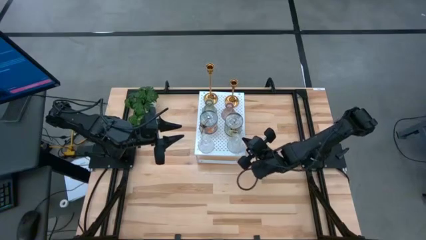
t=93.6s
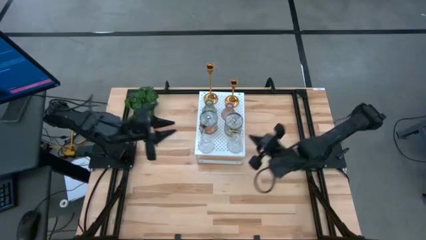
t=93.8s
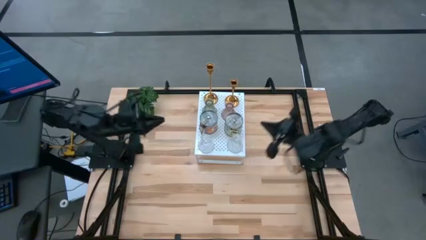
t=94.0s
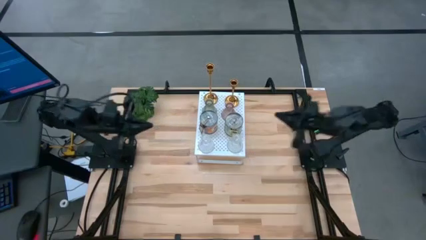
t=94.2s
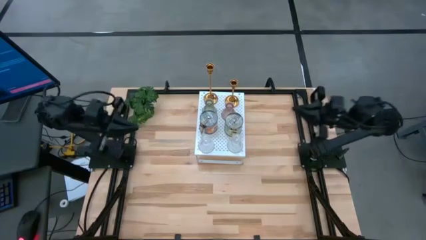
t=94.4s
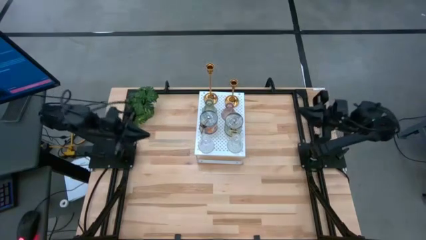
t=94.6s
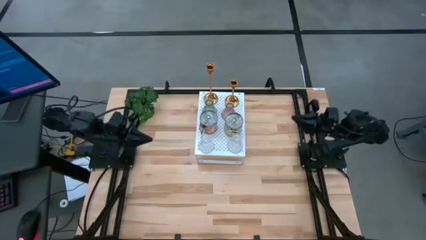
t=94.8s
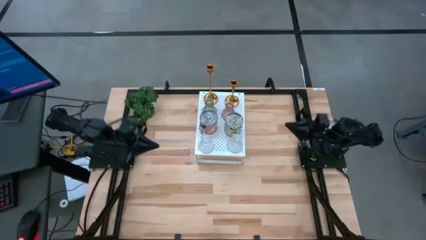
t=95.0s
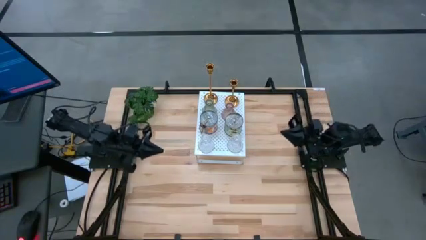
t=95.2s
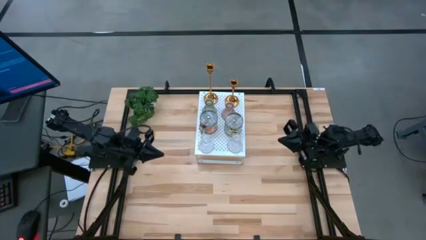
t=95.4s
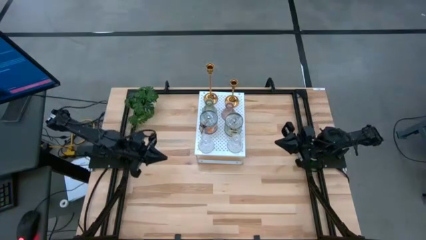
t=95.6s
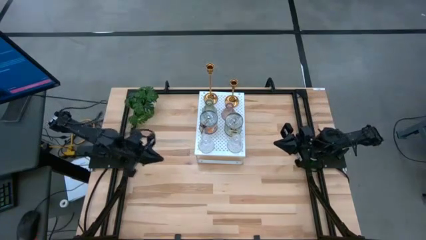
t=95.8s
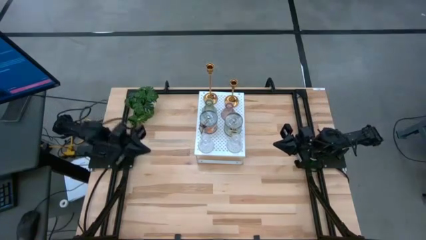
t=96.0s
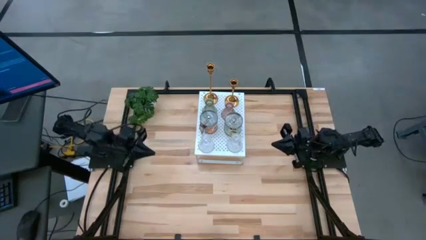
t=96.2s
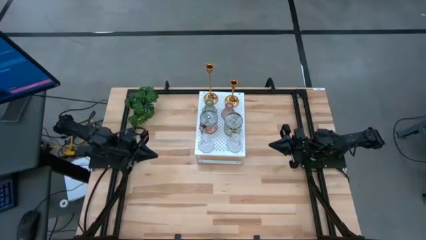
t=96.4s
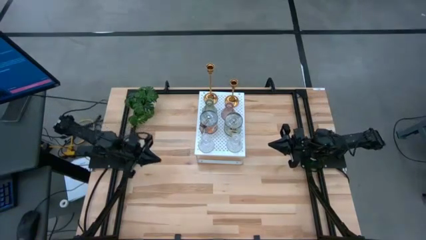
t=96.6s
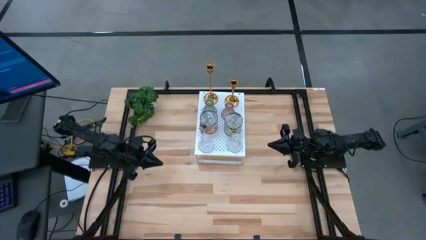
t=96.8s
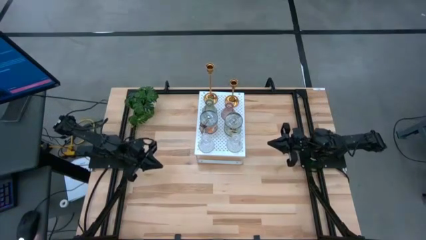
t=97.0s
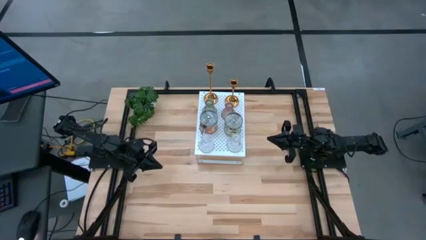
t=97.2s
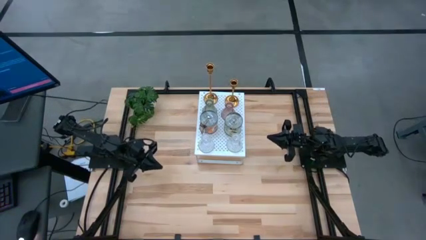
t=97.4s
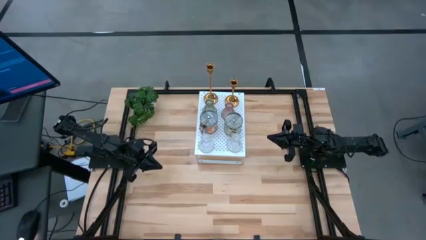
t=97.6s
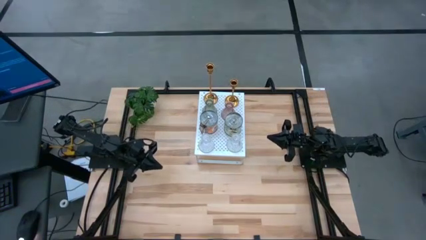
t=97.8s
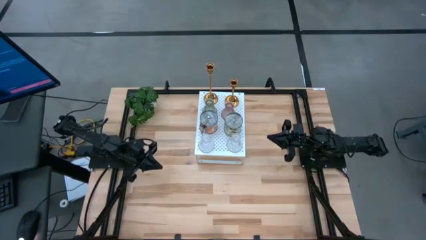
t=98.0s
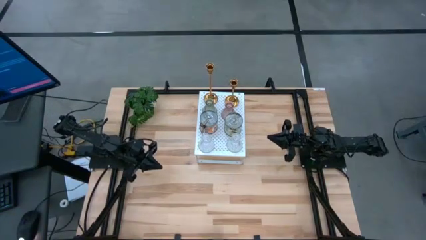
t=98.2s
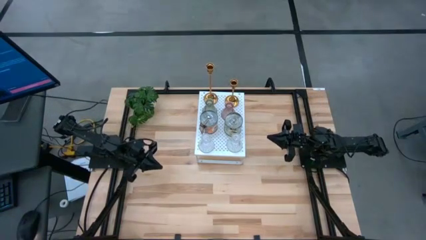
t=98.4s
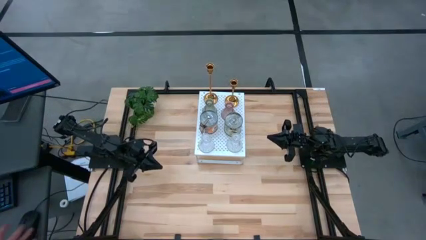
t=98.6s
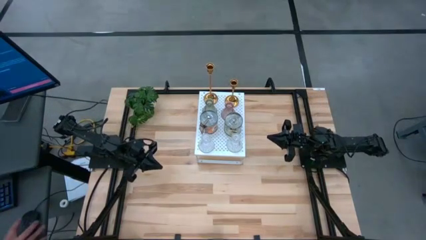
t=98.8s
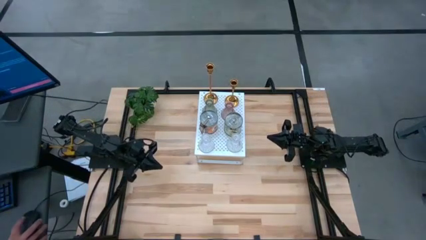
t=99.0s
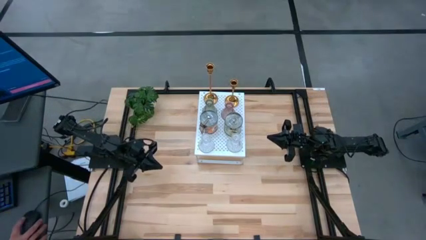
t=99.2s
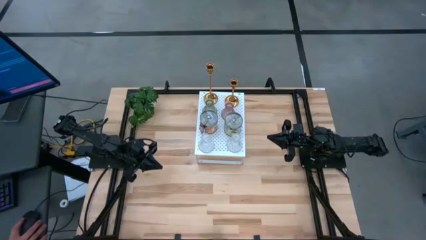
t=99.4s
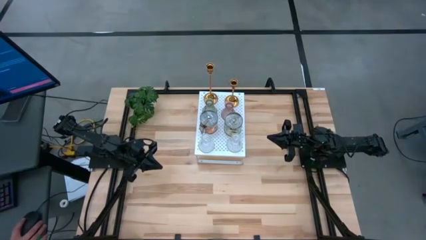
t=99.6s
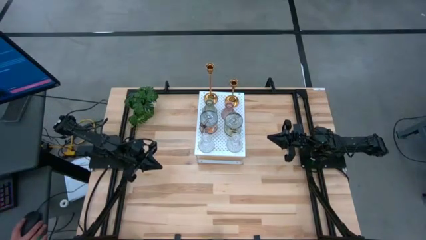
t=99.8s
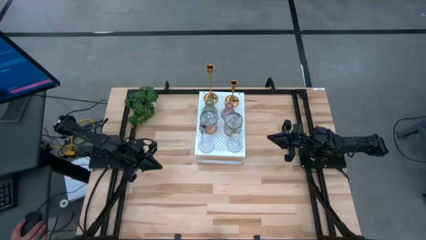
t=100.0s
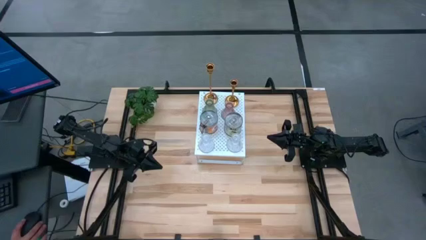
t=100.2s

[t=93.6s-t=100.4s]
Task: Pick & Place candle stick holders
Return to Home Position

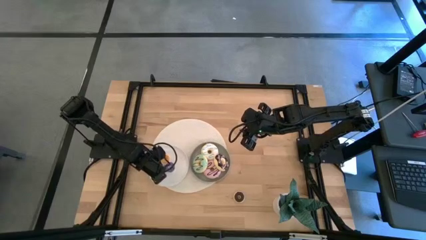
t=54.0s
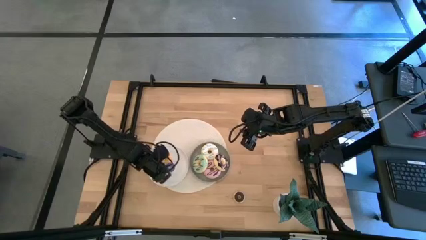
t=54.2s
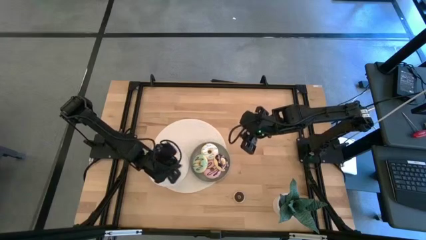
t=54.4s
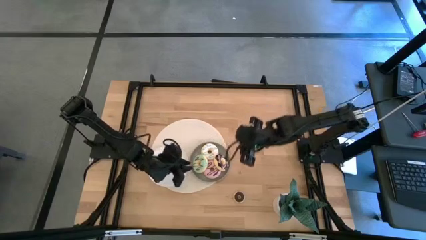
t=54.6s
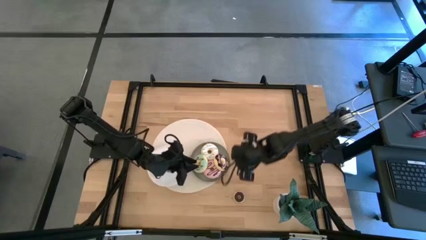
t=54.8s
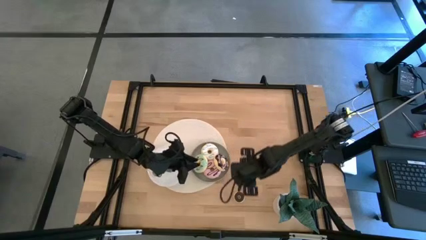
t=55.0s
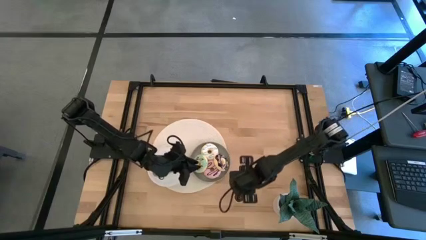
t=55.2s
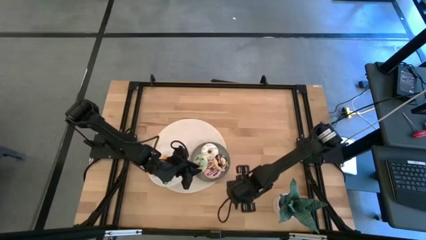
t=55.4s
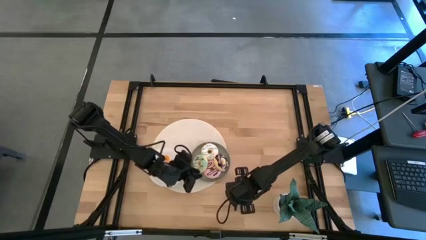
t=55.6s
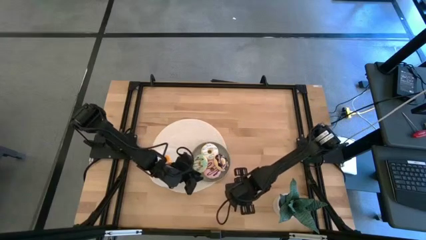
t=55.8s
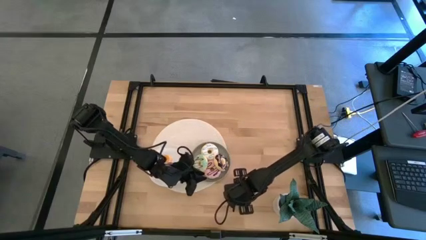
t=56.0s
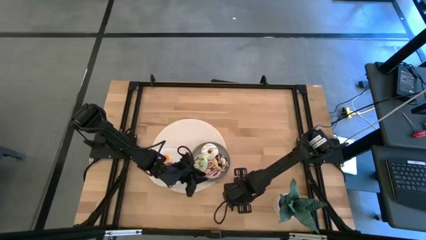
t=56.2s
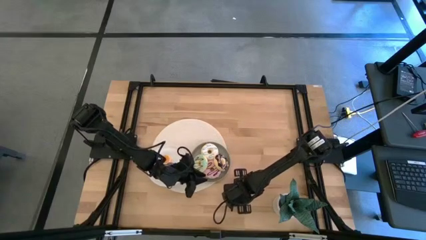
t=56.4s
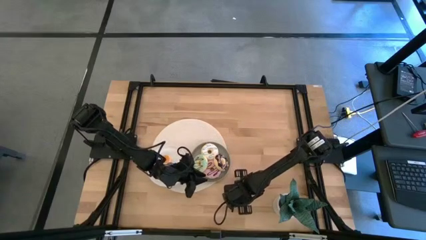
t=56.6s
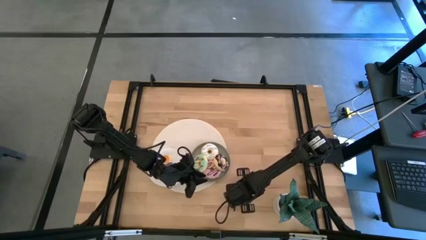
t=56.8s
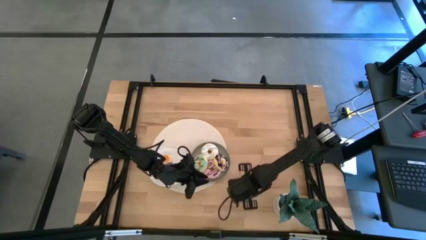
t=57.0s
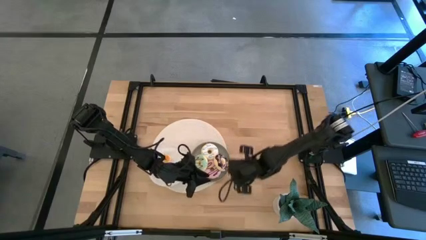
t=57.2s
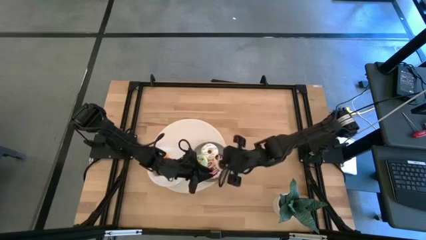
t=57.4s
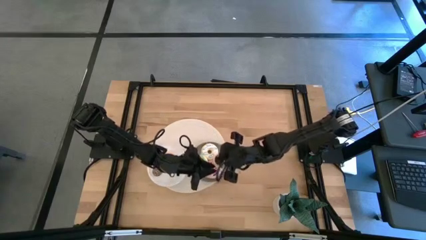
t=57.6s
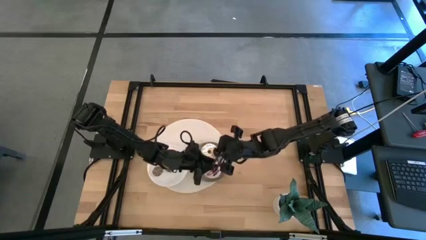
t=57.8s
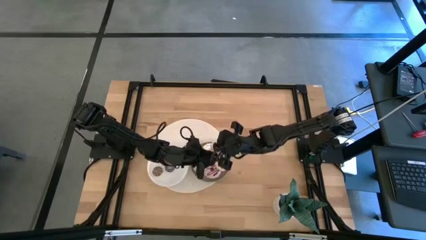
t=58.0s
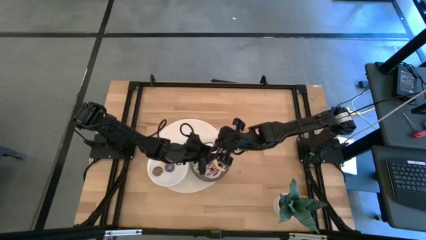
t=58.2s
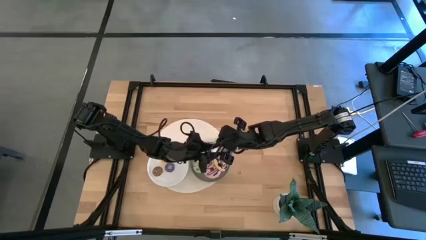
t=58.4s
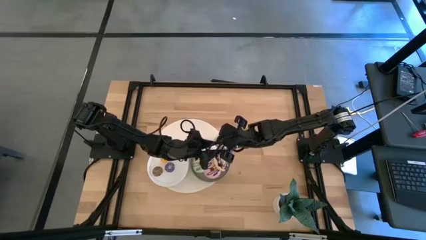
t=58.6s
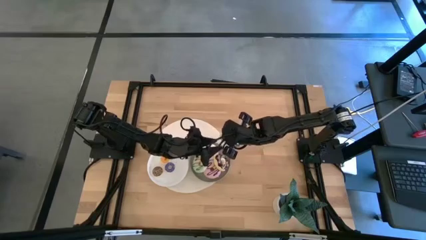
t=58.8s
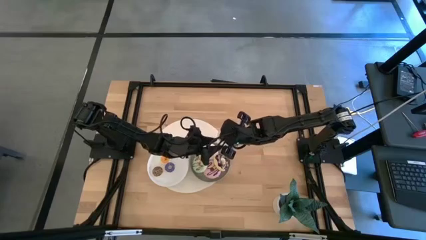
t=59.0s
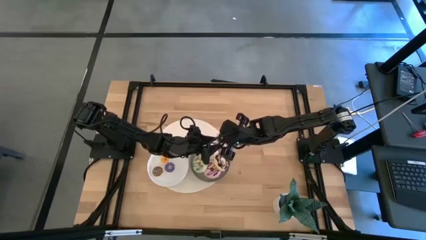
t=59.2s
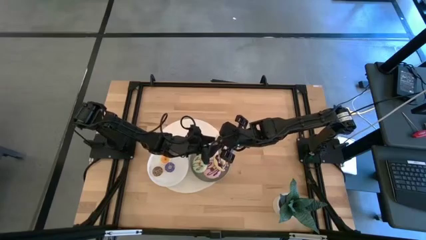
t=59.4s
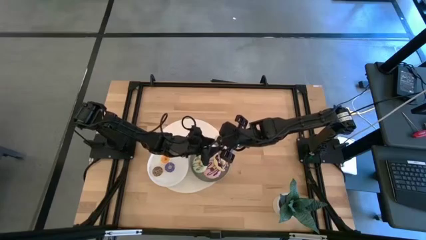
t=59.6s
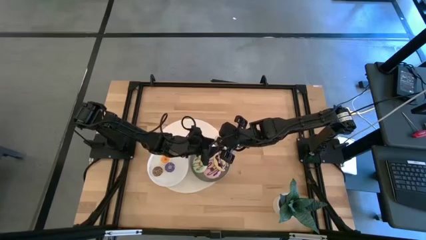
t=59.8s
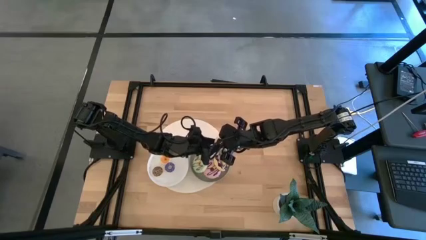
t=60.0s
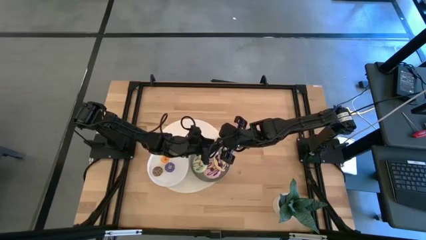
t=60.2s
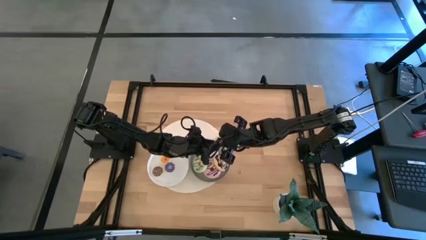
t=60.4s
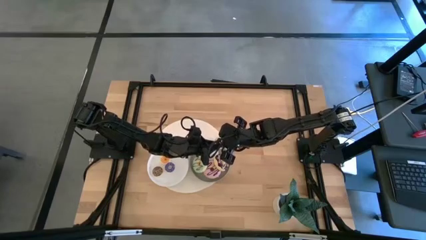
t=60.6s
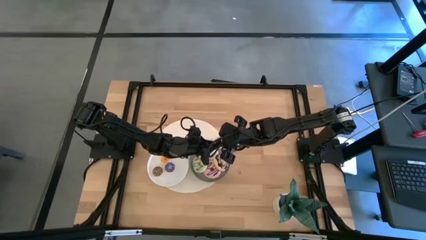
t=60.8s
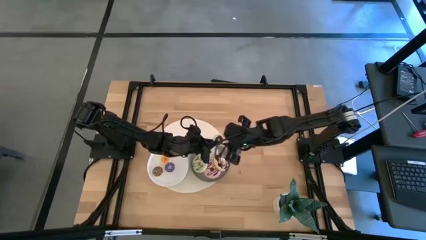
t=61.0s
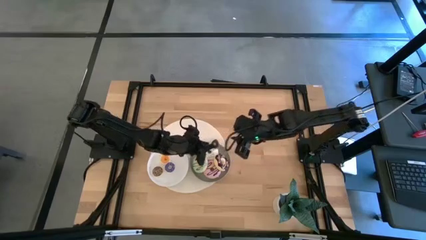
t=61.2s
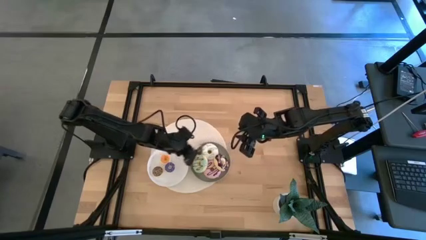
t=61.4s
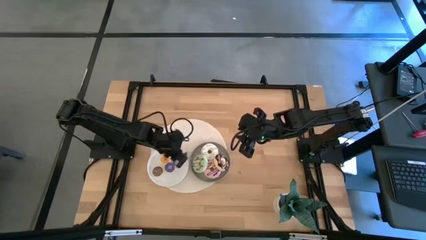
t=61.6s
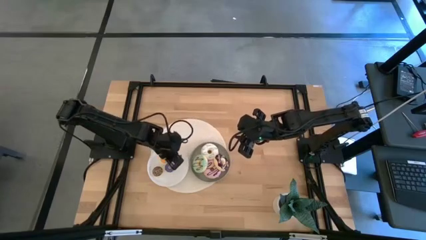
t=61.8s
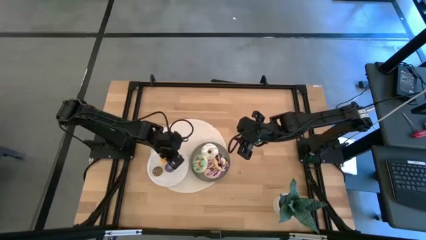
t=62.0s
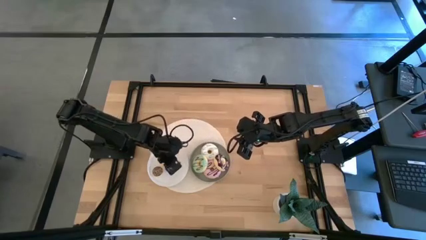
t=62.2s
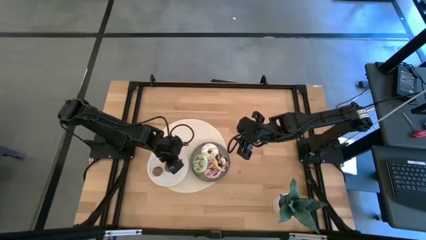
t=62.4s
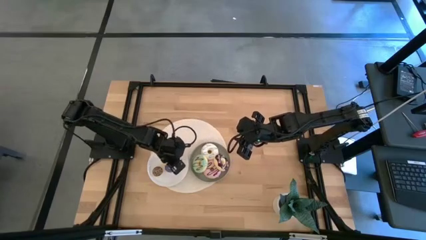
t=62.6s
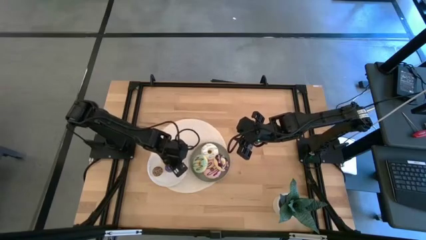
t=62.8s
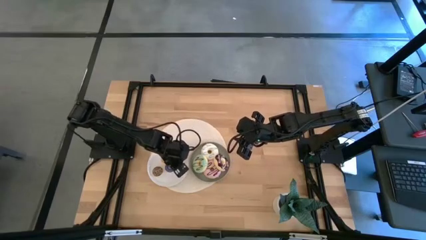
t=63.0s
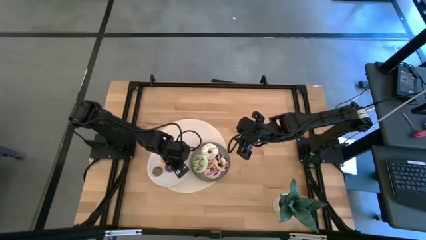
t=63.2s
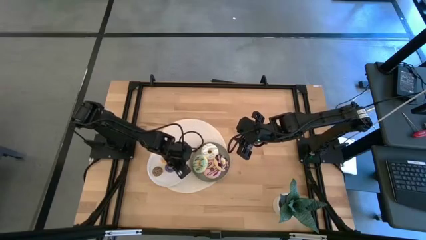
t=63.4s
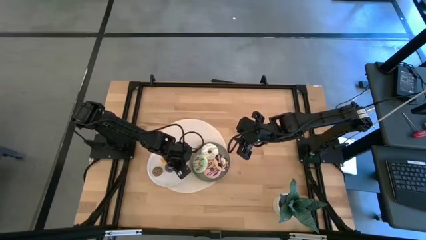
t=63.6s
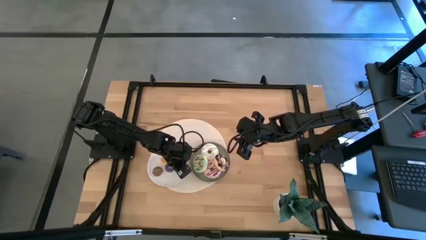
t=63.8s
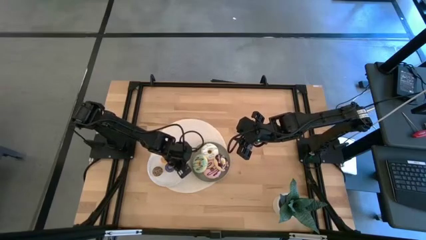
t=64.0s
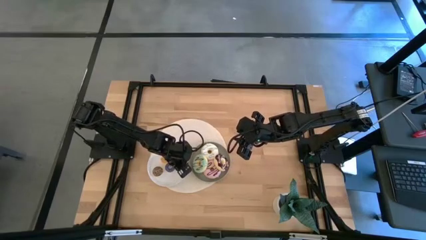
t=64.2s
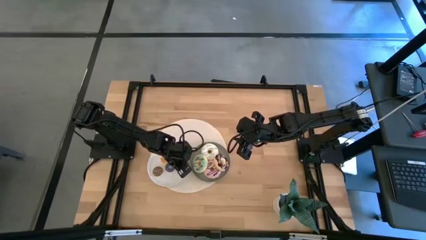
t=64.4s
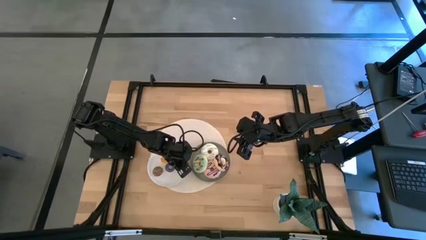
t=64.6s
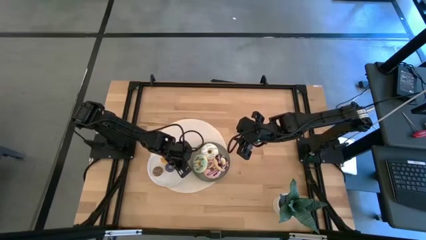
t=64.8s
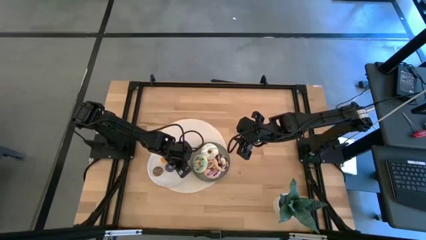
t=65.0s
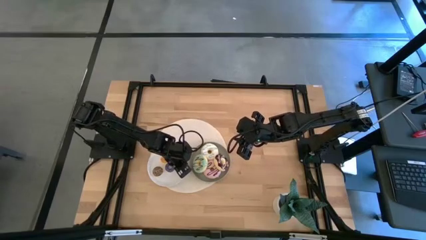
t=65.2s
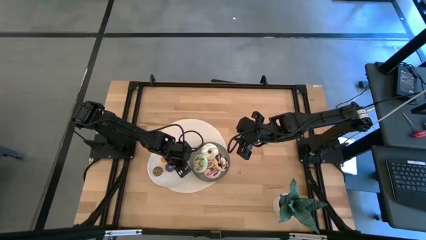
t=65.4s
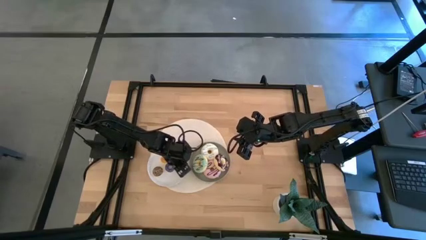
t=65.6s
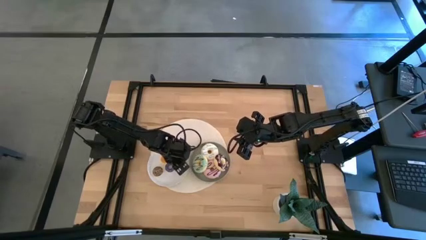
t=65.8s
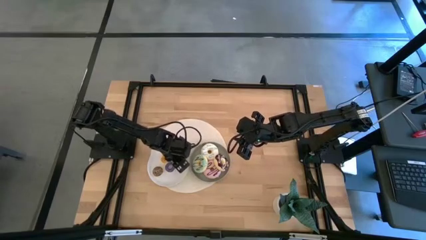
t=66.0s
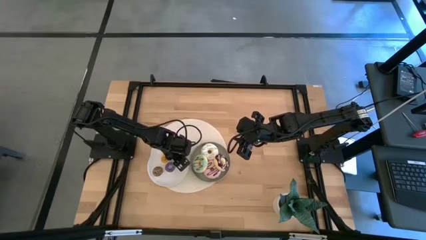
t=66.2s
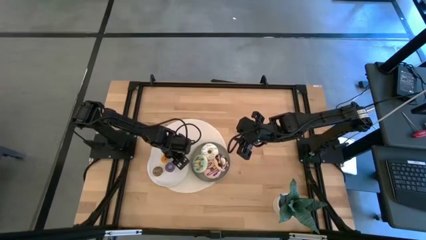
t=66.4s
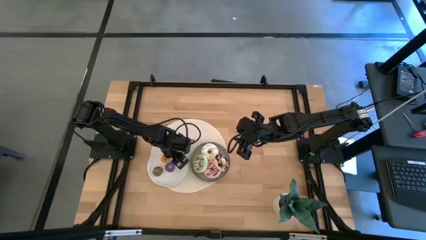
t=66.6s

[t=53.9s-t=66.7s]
Task: Pick & Place donuts
Put the small black donuts on the white plate
